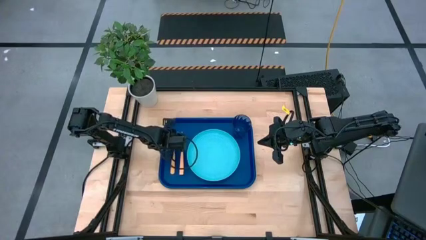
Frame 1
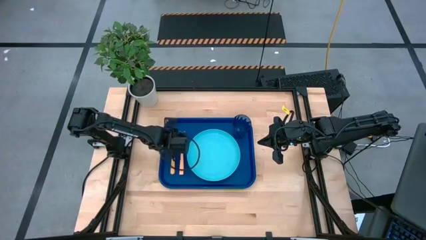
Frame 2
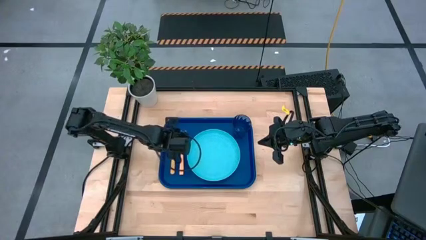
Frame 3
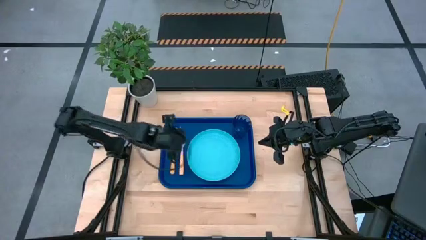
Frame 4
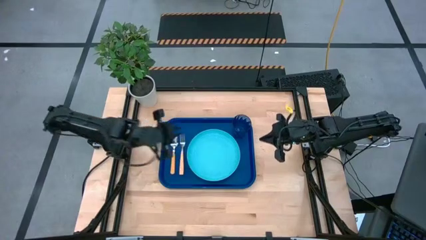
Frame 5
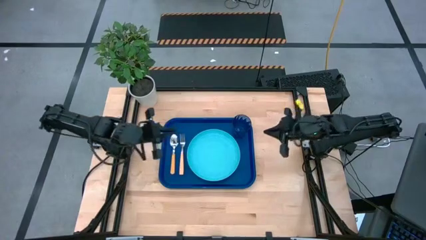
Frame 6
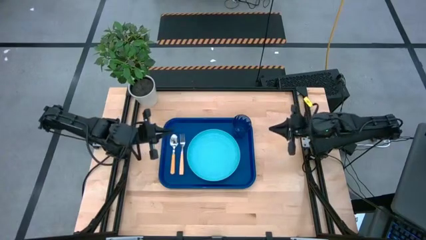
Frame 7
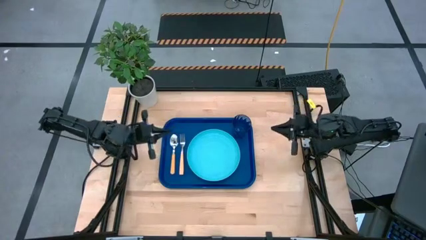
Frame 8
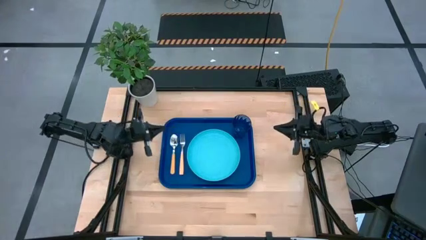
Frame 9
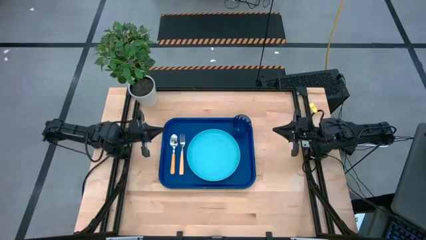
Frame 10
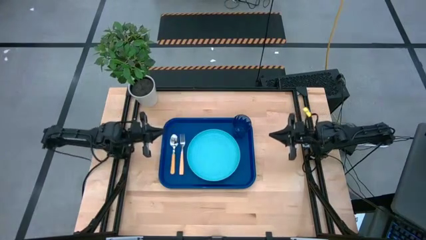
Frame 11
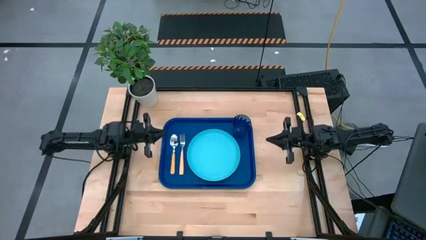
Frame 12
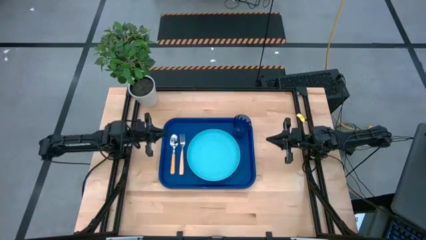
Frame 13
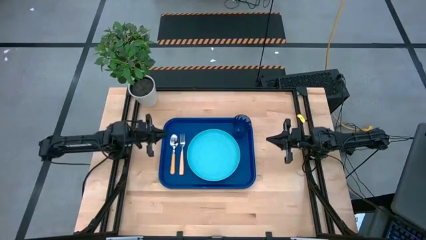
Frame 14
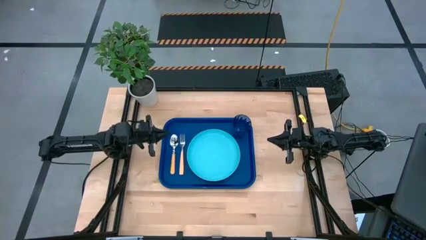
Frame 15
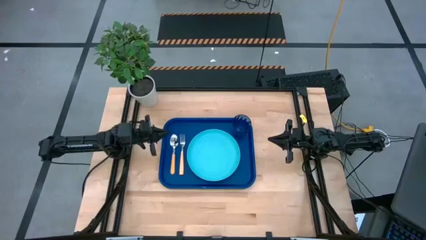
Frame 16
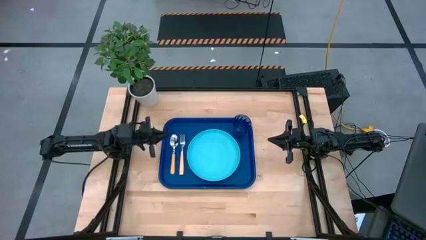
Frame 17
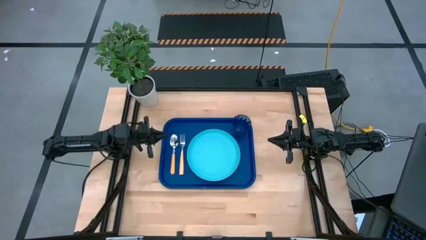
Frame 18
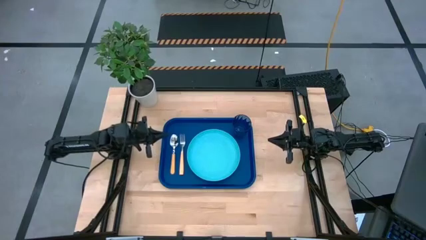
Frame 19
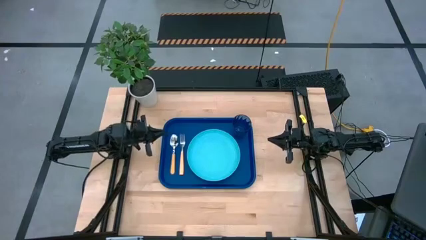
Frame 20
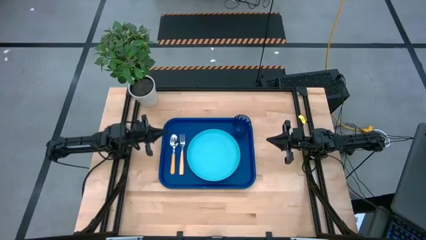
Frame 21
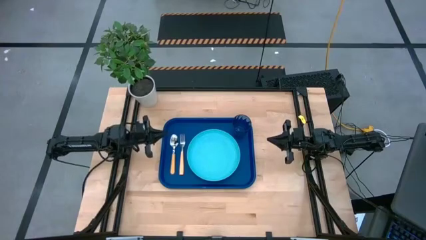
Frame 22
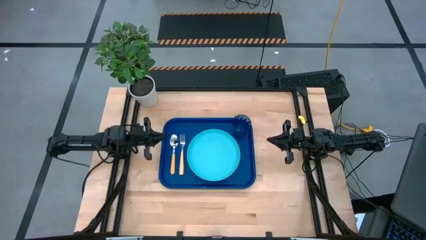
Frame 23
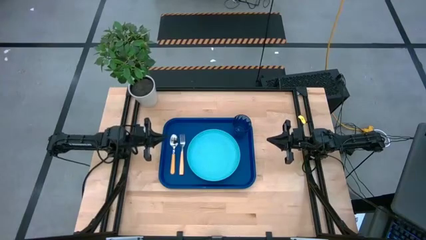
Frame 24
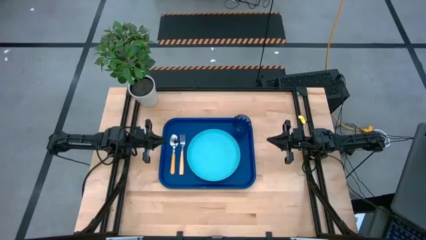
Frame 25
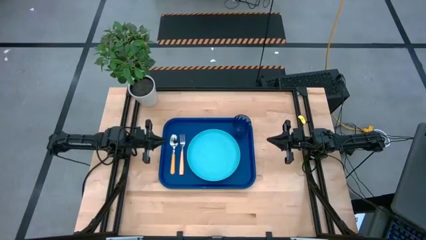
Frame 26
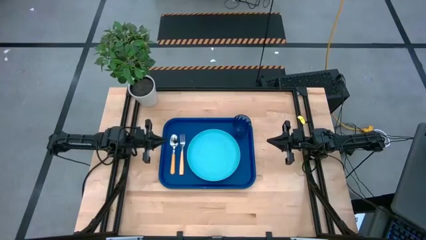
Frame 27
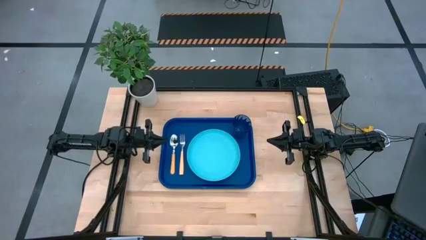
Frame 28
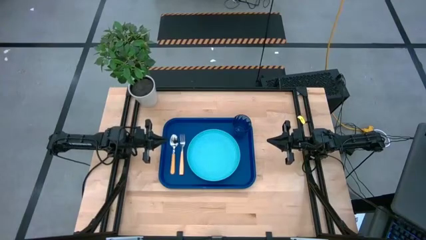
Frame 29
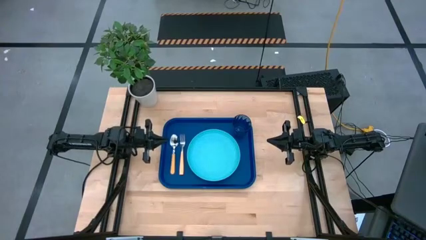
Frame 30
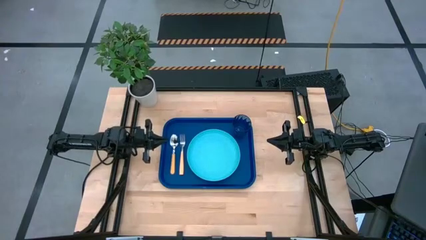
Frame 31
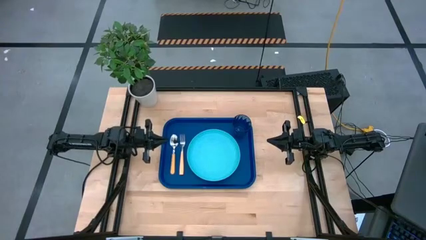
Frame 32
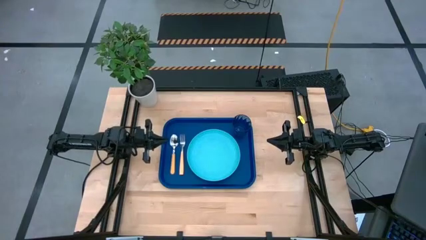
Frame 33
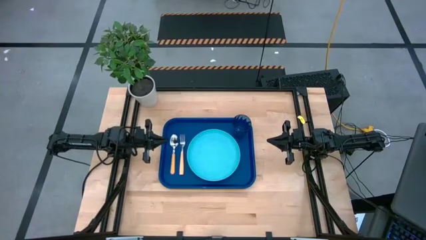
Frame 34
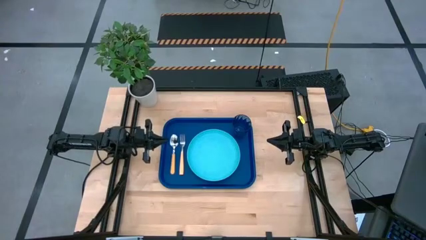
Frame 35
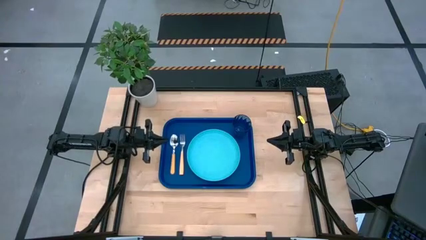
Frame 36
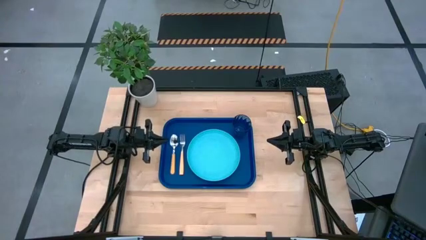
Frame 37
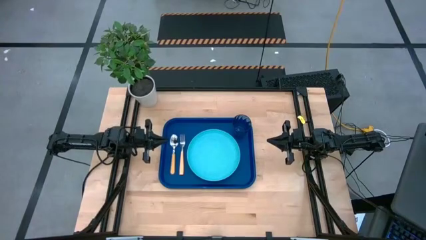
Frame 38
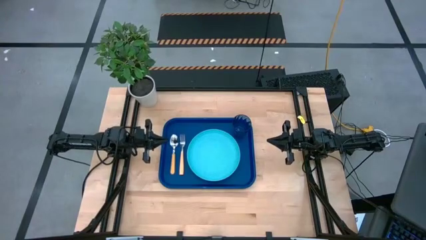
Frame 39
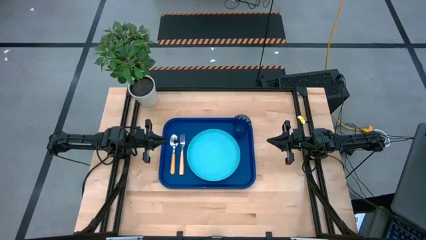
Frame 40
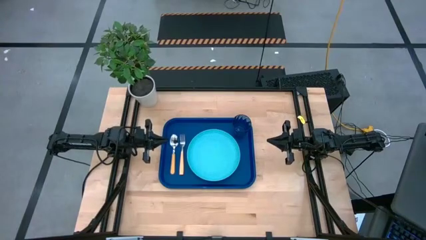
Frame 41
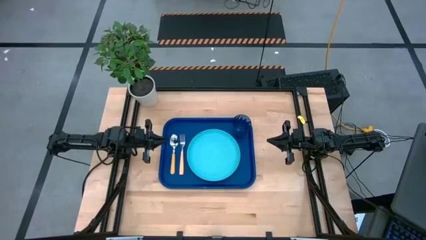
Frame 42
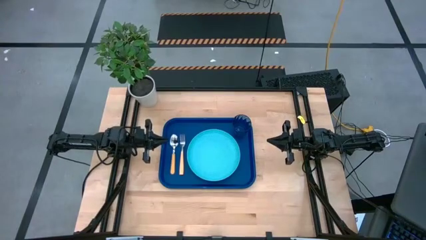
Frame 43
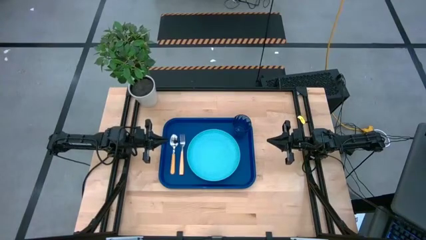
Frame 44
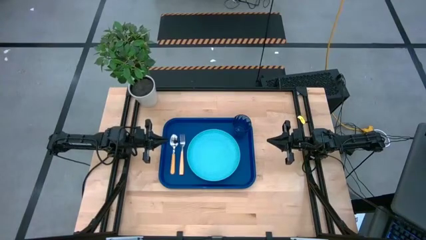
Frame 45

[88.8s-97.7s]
Task: Pick and place plate/cup/fork/spoon on tray
Return to Home Position

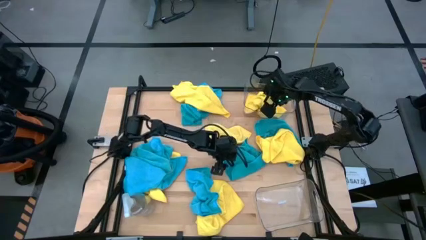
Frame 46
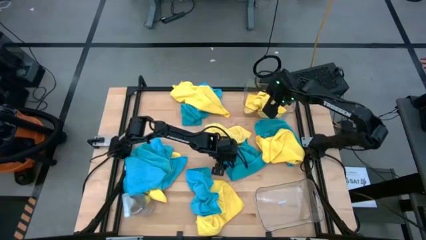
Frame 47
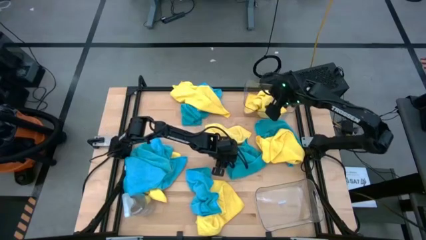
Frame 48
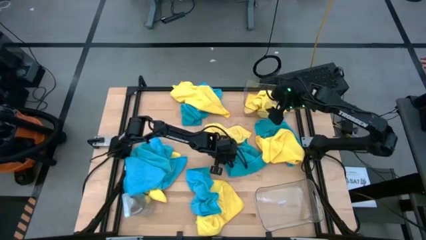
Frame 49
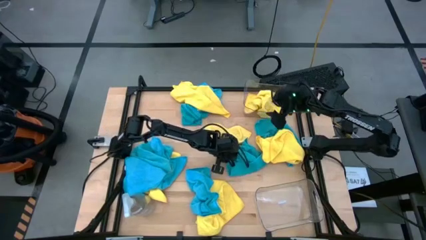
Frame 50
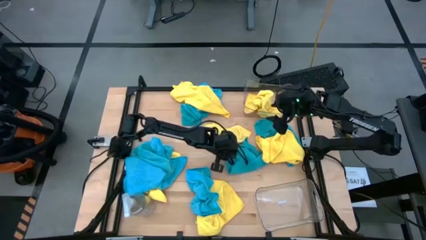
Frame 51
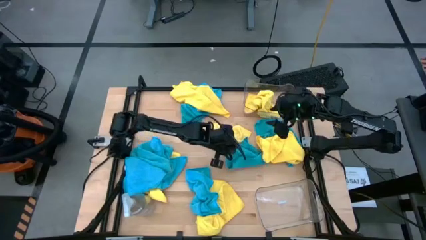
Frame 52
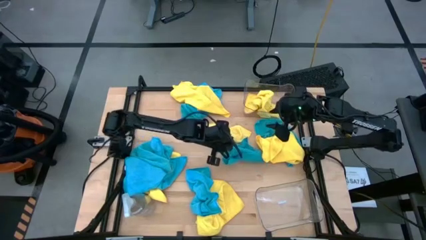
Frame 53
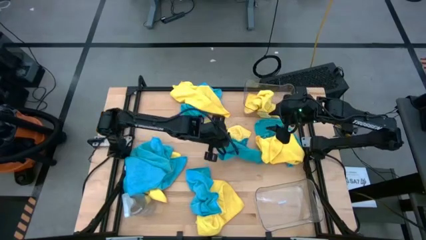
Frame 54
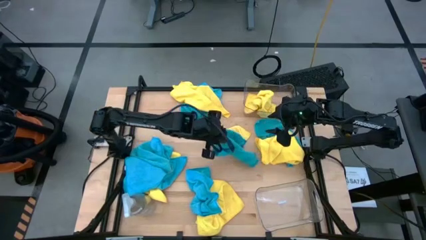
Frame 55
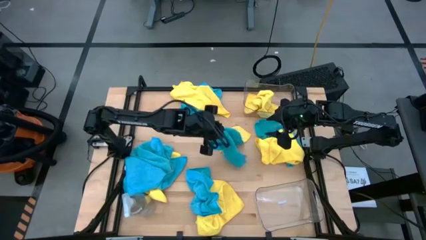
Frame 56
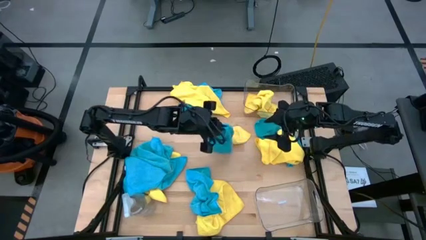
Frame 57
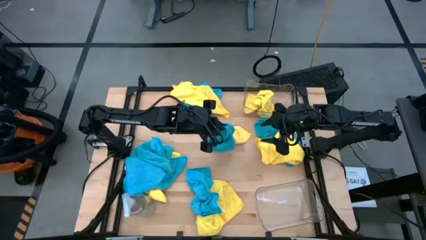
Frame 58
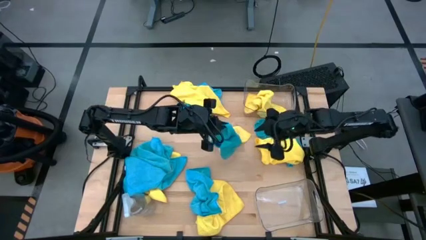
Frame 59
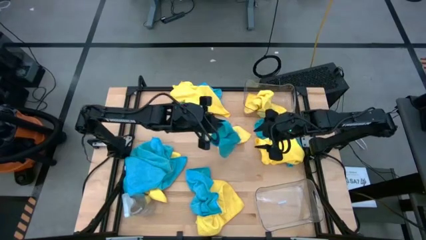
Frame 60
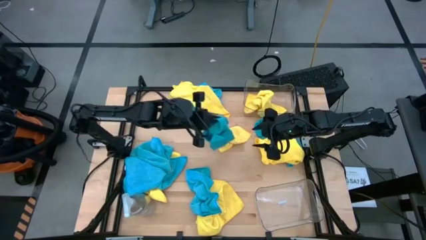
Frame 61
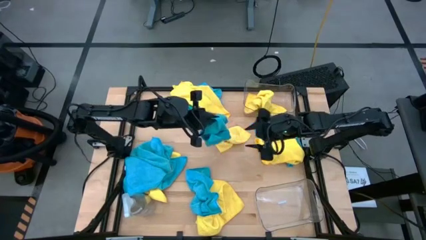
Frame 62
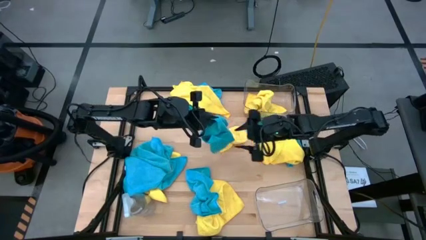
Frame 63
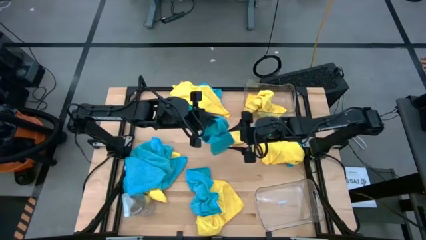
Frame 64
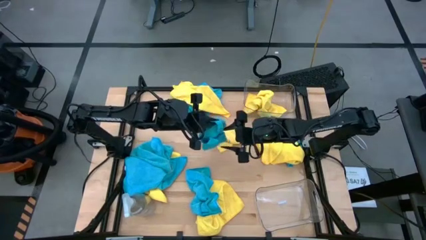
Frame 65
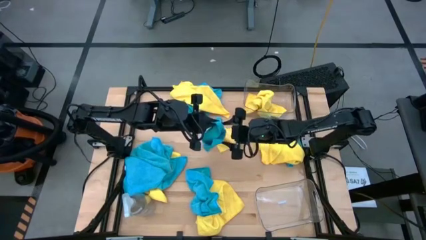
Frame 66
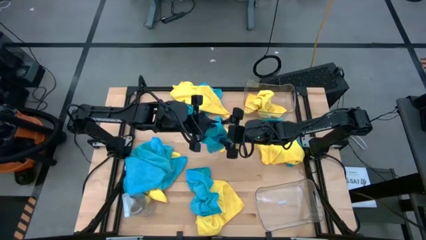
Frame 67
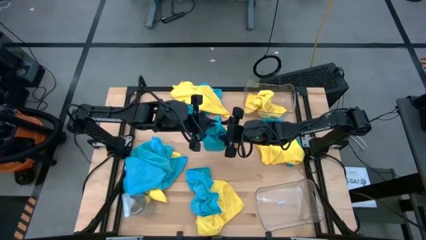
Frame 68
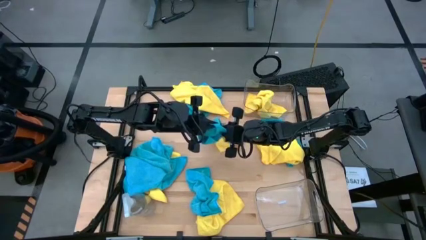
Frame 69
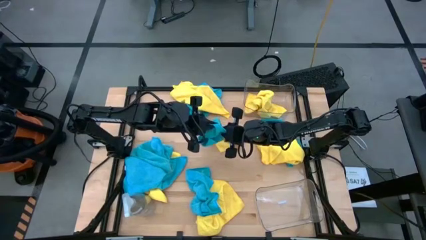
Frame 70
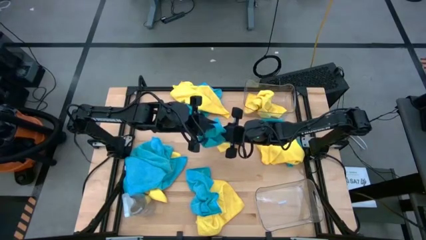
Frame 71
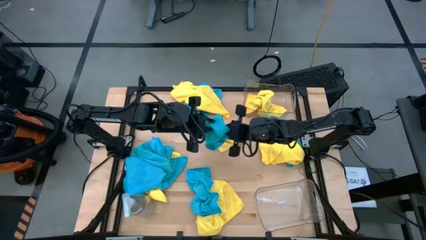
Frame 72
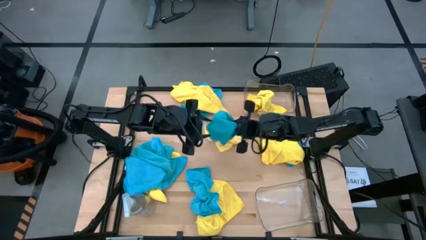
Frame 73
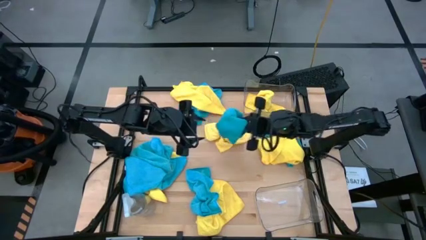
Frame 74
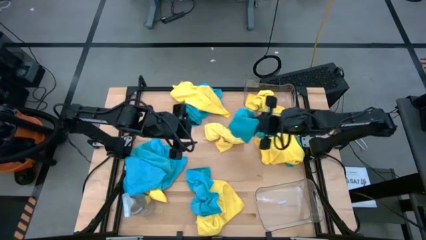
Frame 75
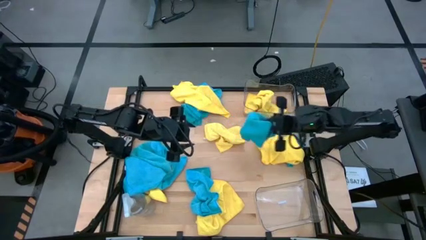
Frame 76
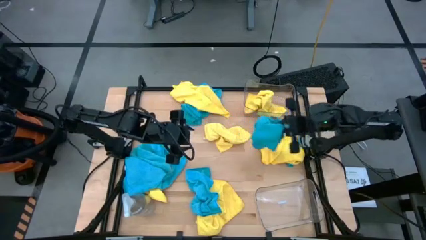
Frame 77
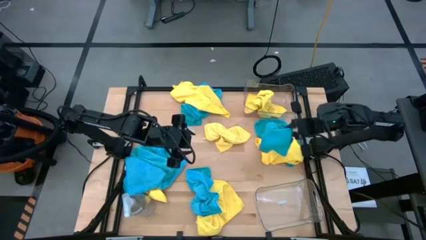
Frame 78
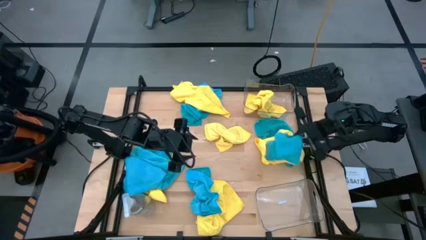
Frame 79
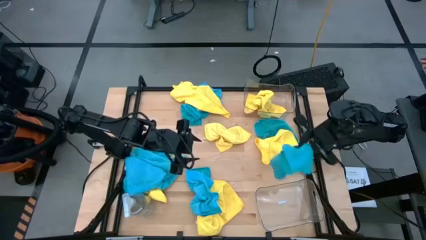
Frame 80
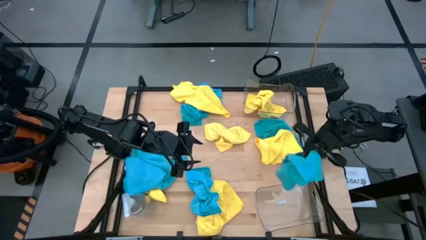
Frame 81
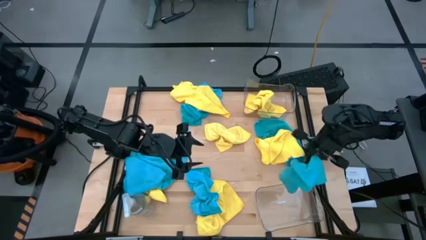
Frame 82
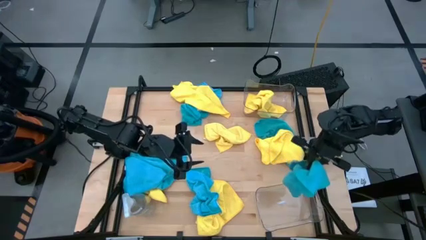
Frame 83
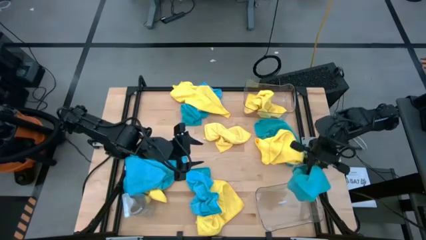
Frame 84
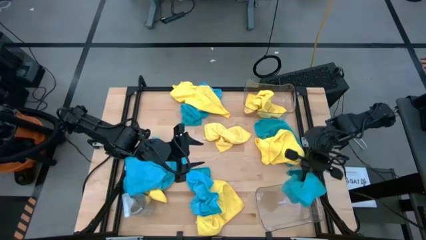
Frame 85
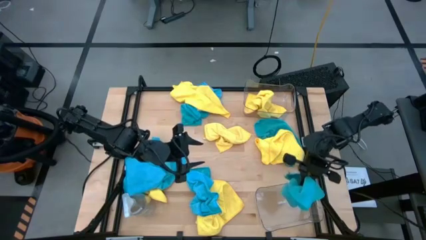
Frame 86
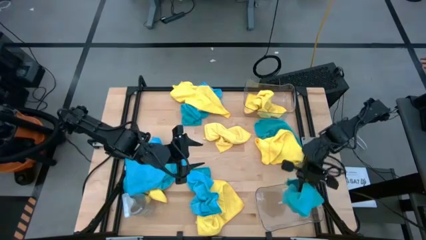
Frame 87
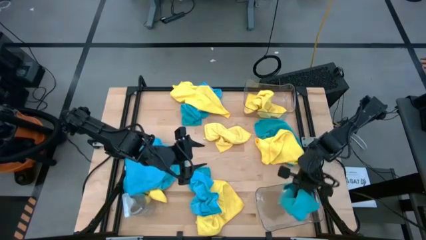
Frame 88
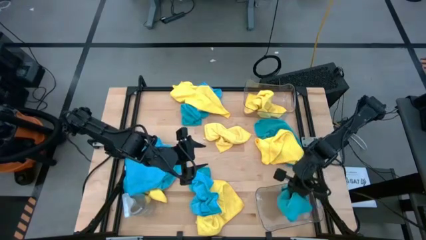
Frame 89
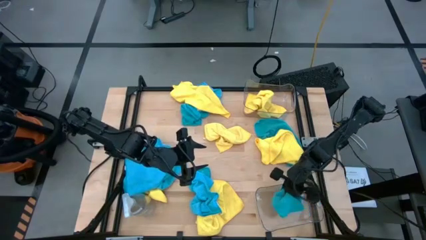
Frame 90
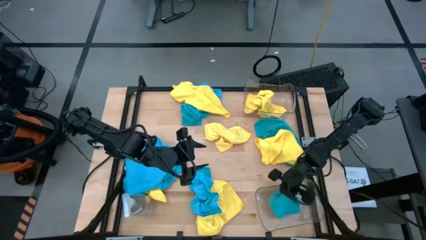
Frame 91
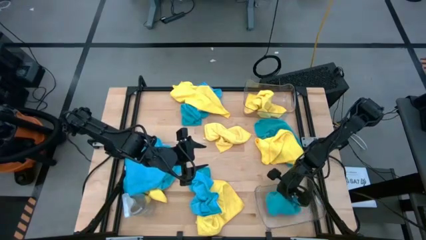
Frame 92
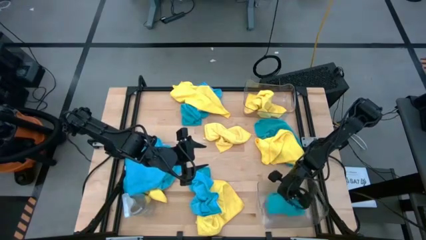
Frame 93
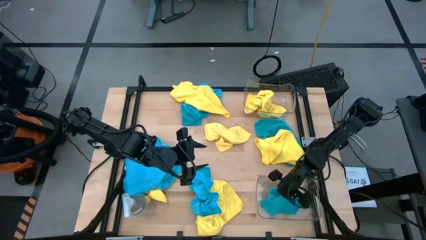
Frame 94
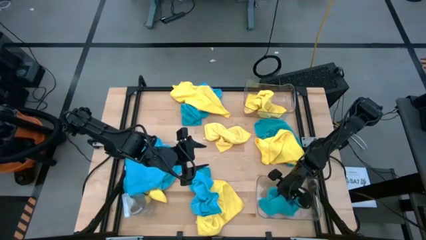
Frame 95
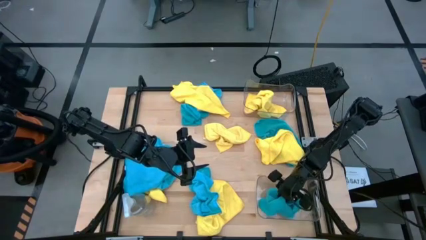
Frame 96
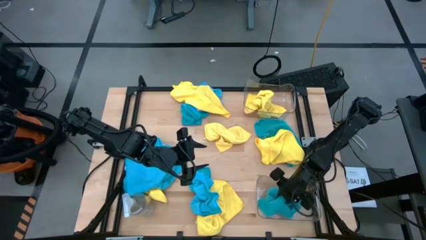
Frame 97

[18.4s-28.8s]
Task: Sort microfiber towel by color & place in baskets
Put the blue microfiber cloth into the bottom transparent bin
